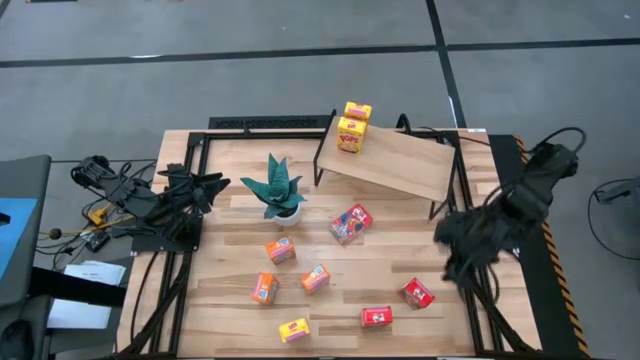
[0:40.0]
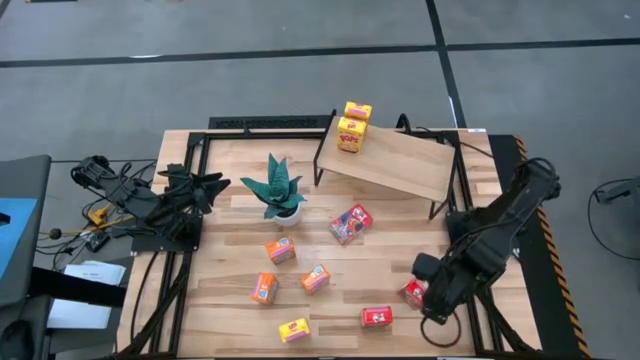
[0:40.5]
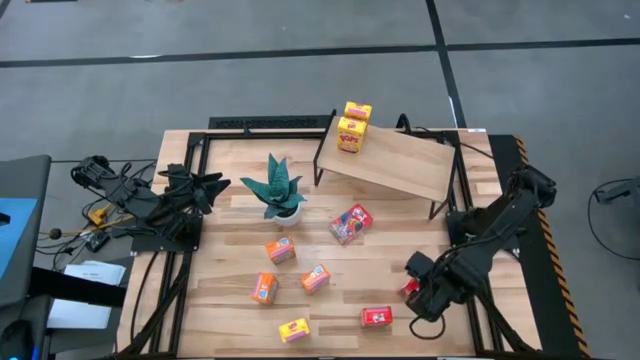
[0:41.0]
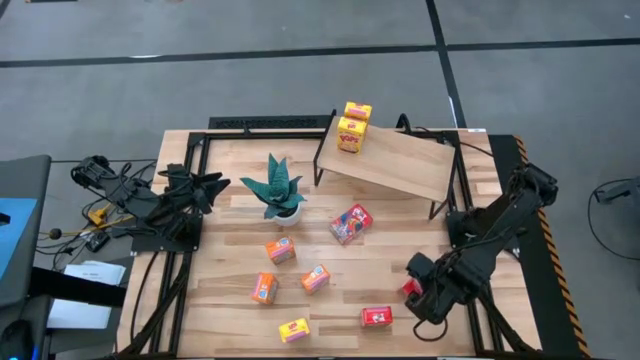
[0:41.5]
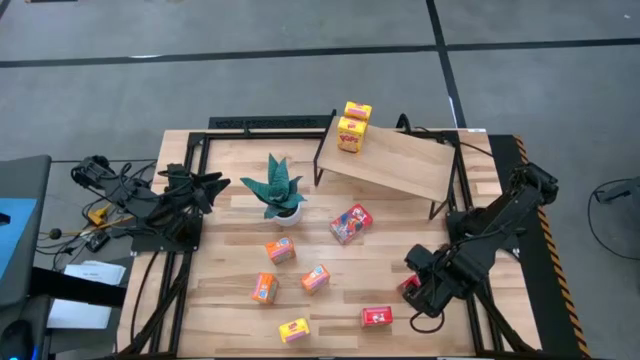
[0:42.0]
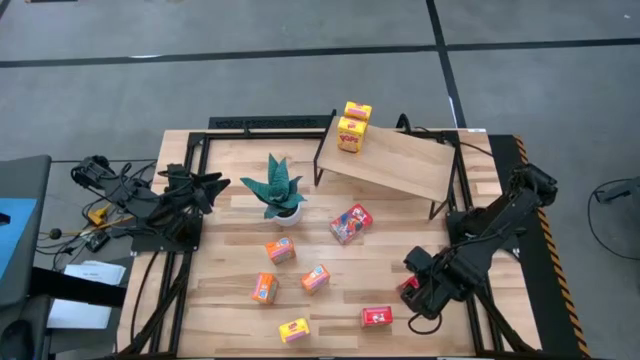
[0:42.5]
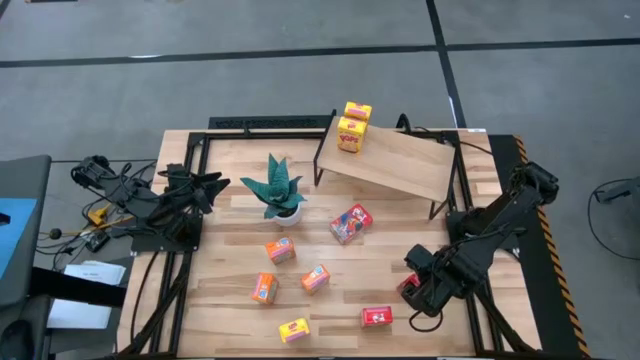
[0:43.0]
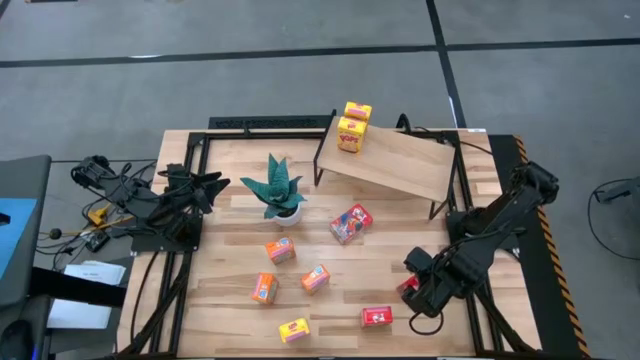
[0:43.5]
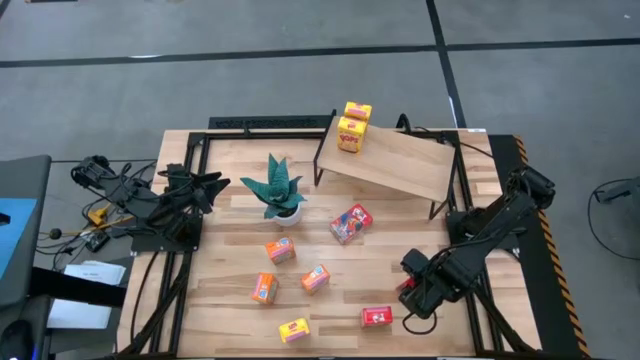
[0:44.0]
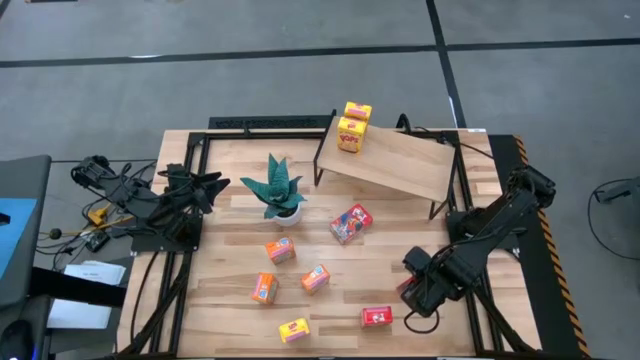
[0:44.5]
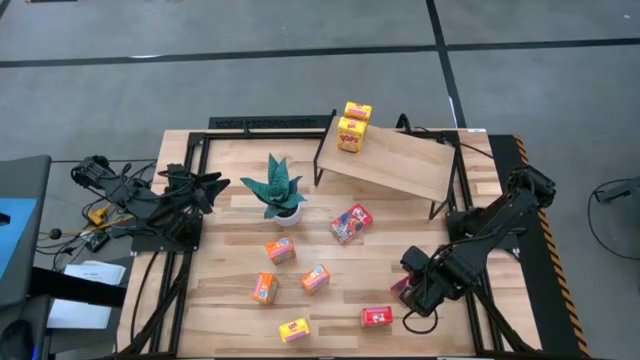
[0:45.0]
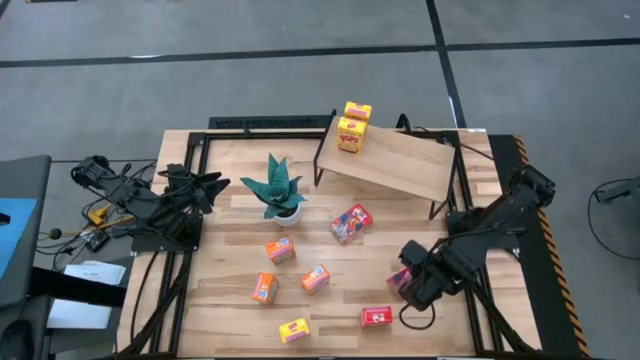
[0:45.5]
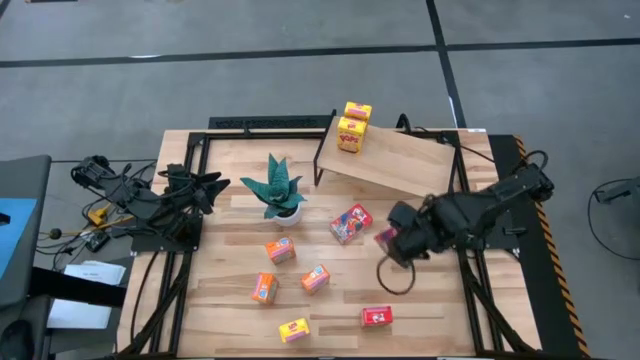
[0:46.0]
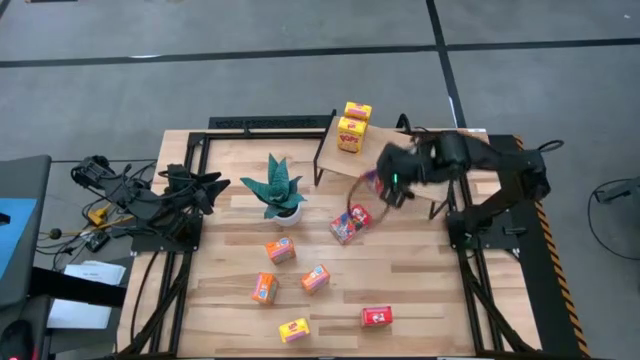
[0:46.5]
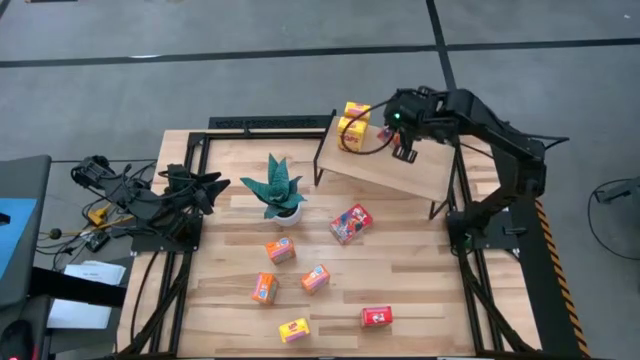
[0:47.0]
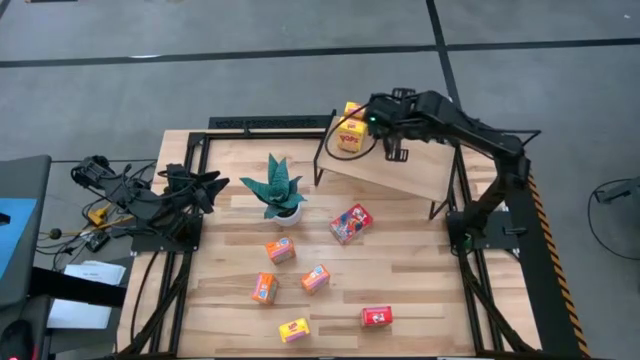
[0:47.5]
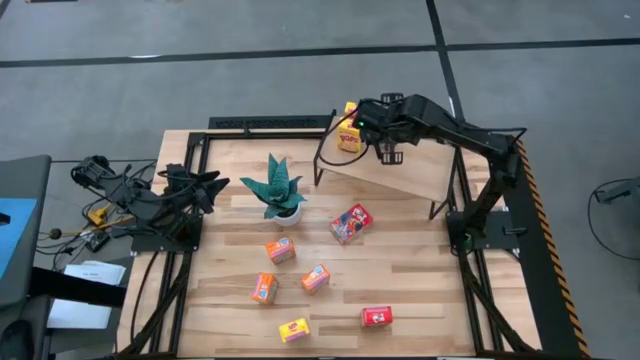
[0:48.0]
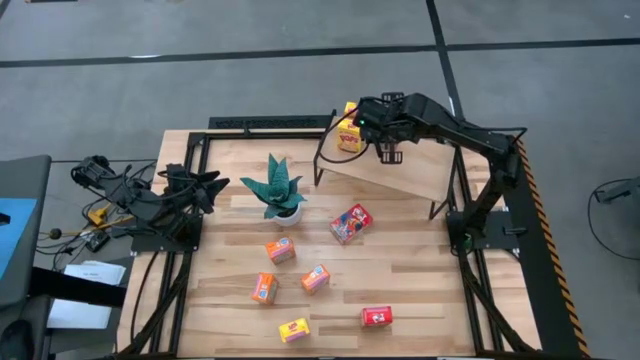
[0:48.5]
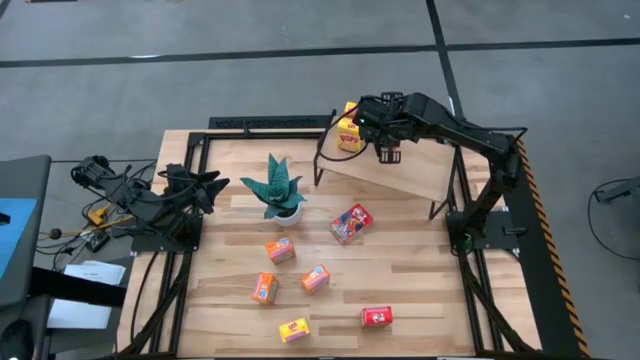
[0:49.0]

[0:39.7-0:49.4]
Task: Stack cereal on shelf
Put the right red cereal box on the shelf

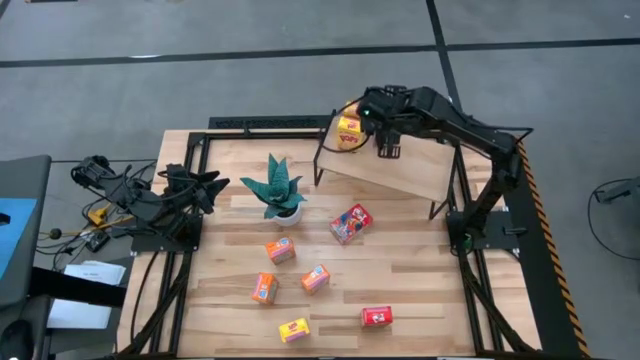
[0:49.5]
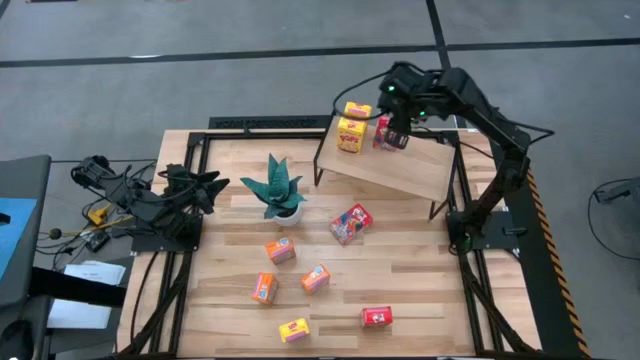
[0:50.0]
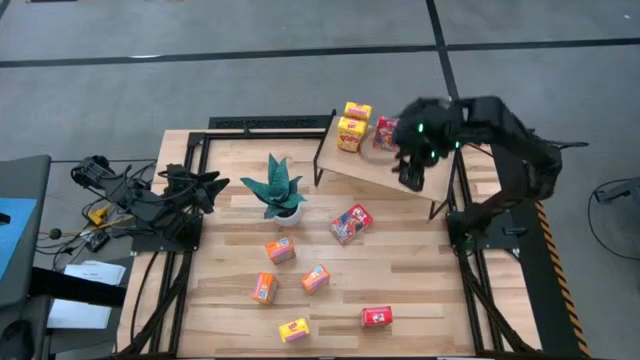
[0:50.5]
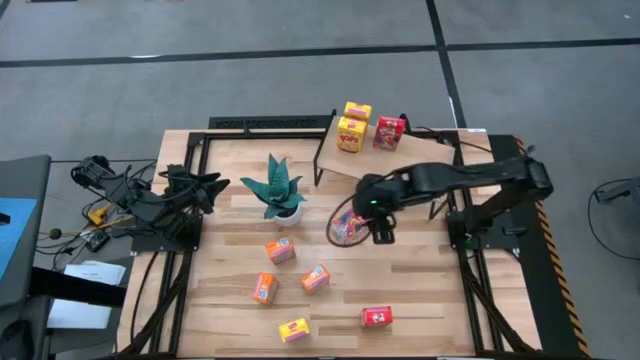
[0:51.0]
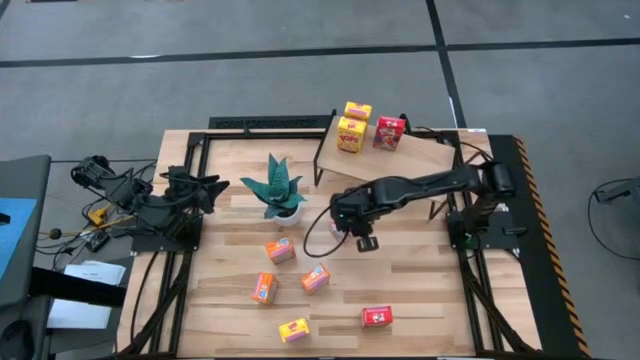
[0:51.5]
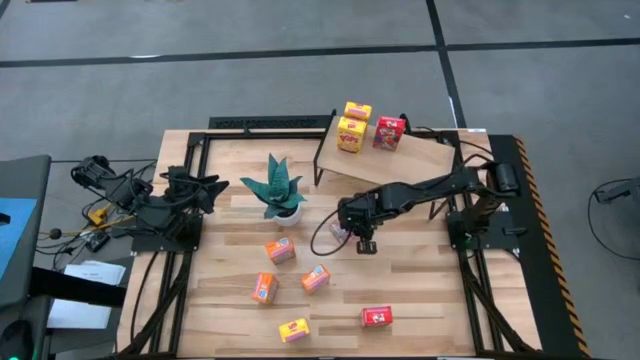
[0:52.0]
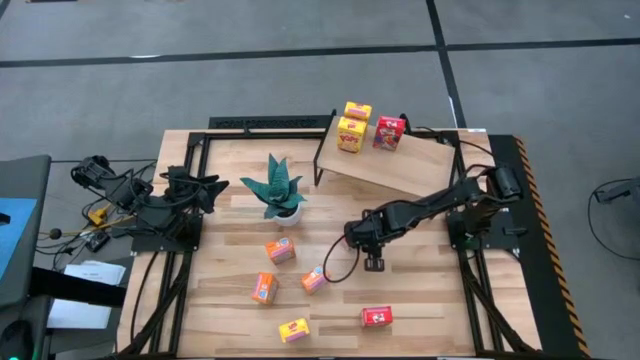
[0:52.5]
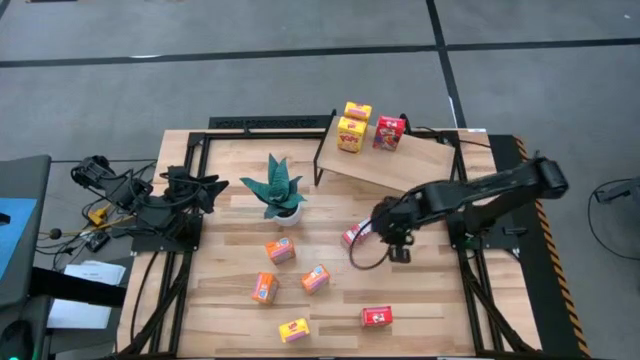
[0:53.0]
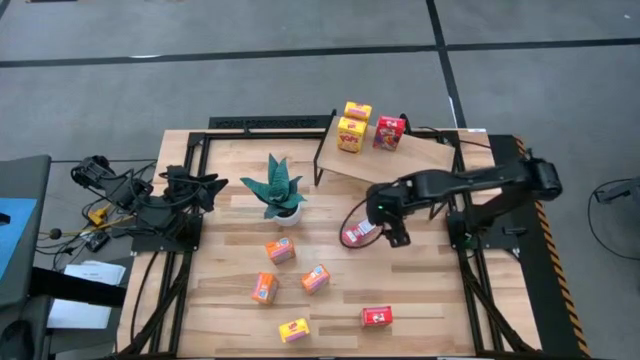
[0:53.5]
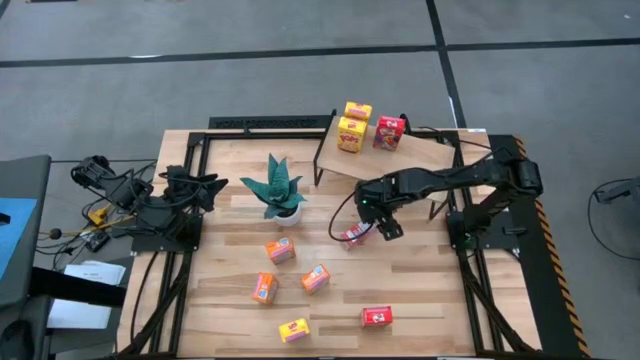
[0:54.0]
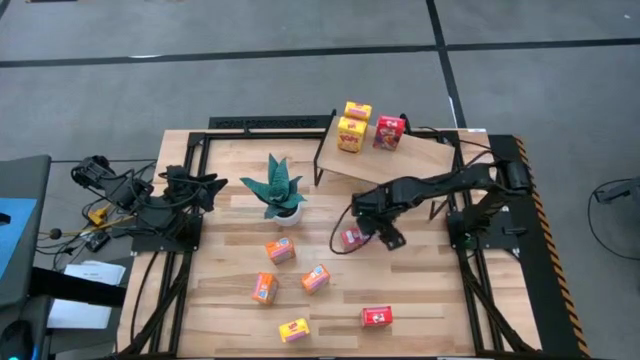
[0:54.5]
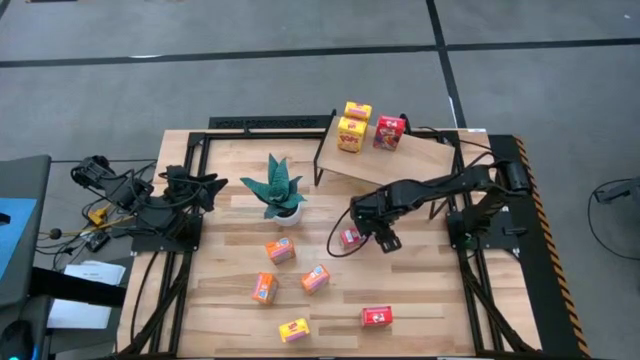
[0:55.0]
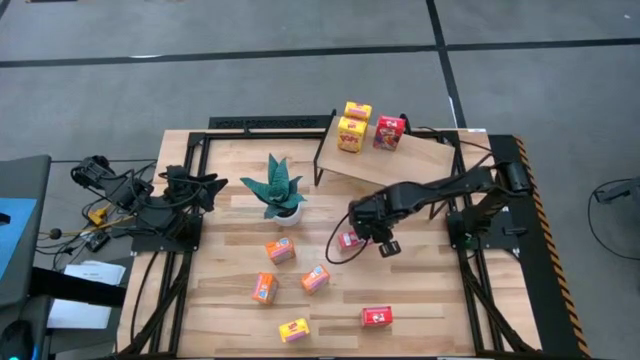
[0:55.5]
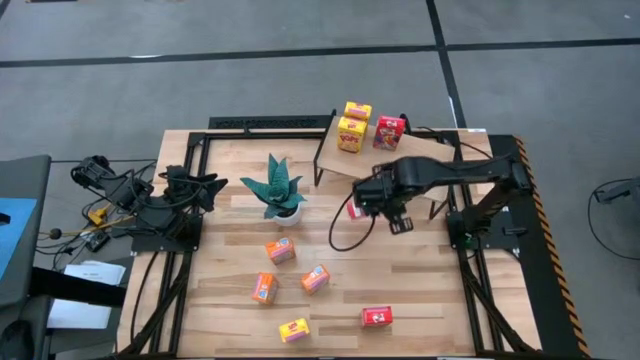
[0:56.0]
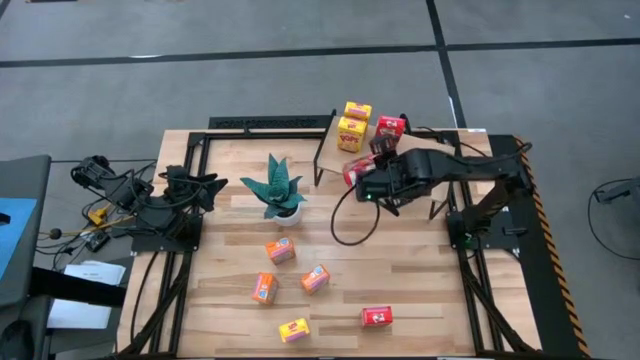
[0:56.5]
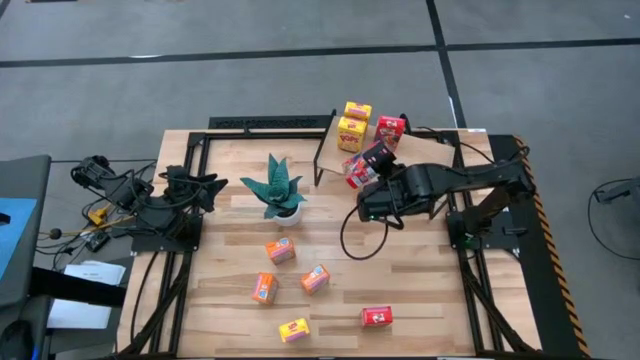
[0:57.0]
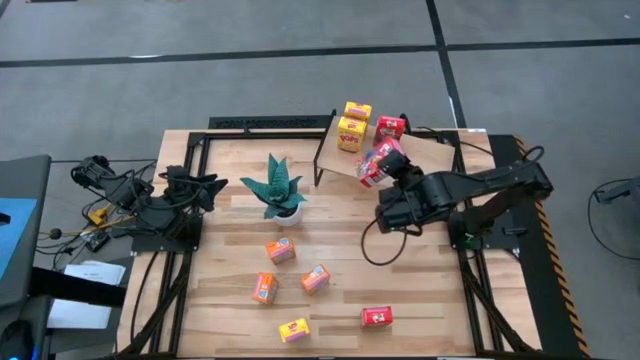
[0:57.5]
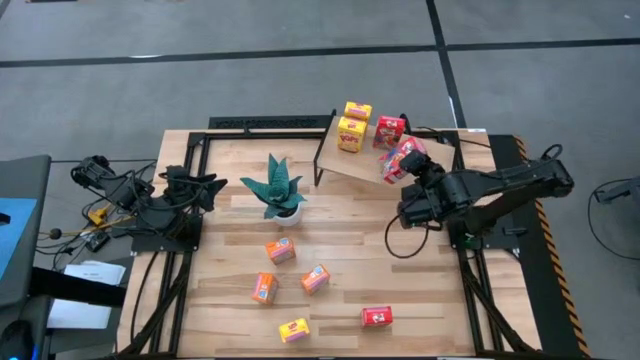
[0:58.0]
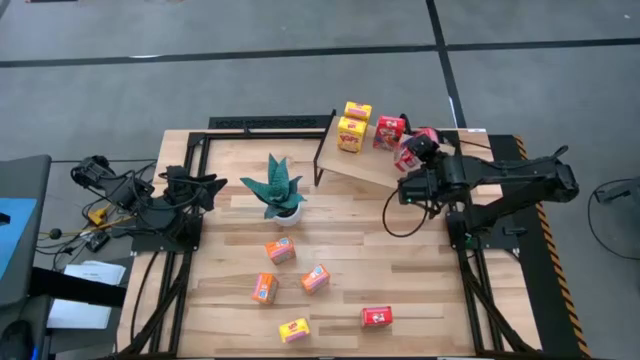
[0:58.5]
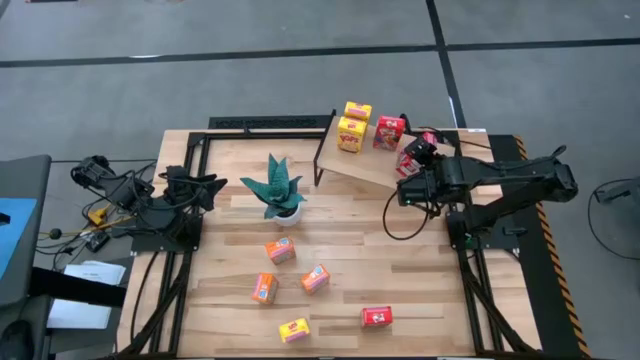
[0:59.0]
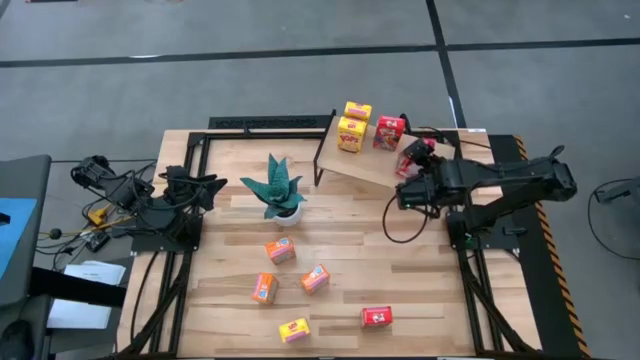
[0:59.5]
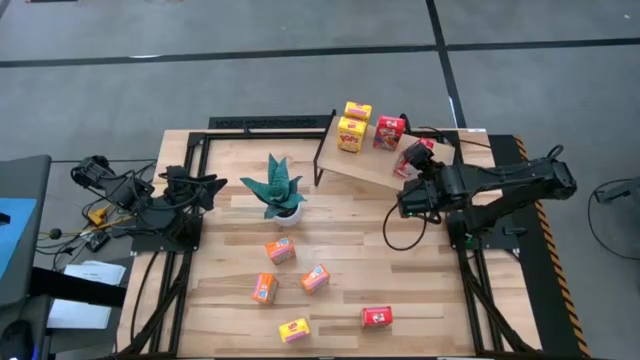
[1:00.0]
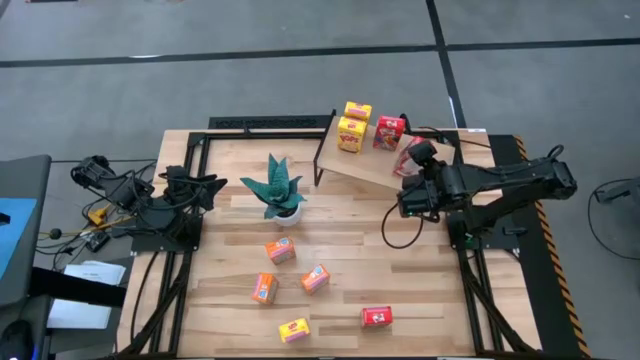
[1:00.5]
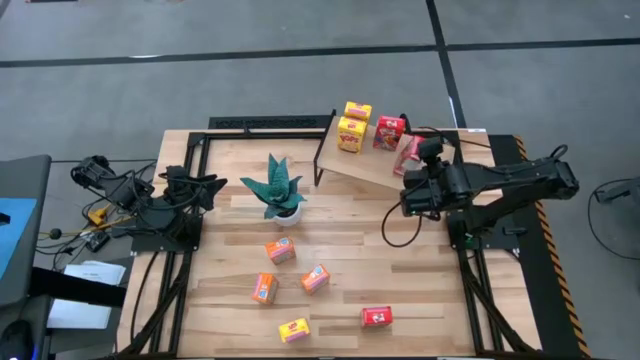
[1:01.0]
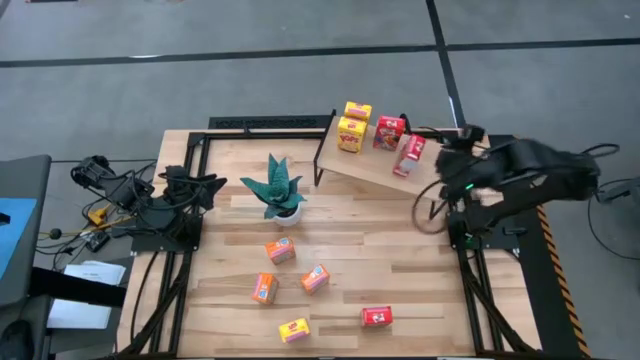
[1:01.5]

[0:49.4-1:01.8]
Put the top red cereal box on the shelf aligned with the other red cereal box
